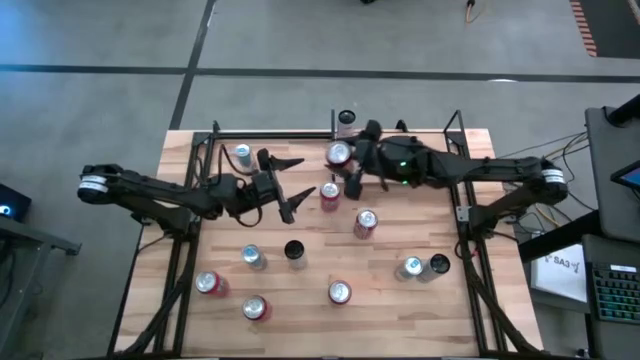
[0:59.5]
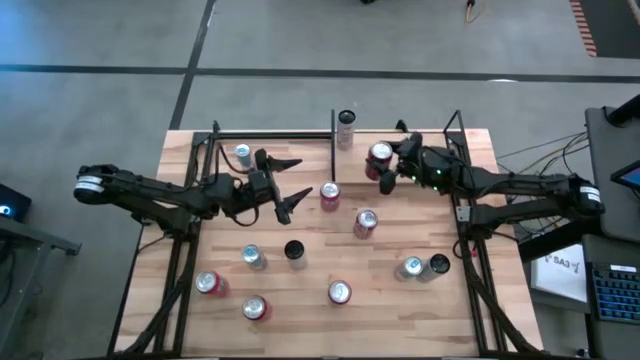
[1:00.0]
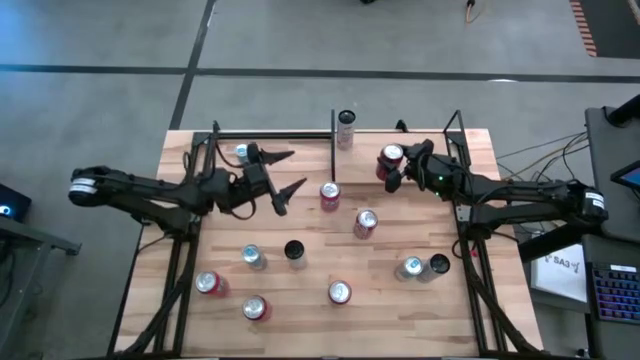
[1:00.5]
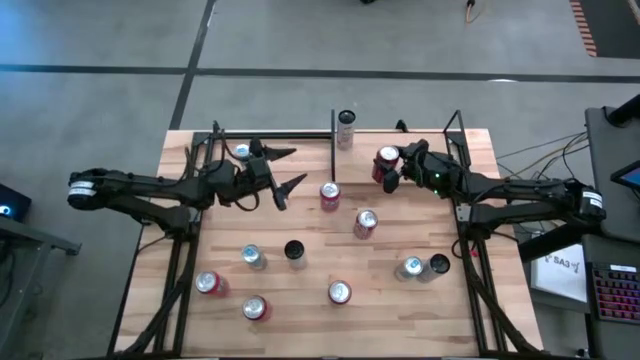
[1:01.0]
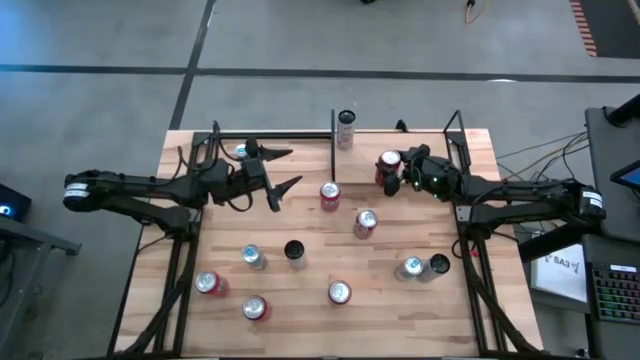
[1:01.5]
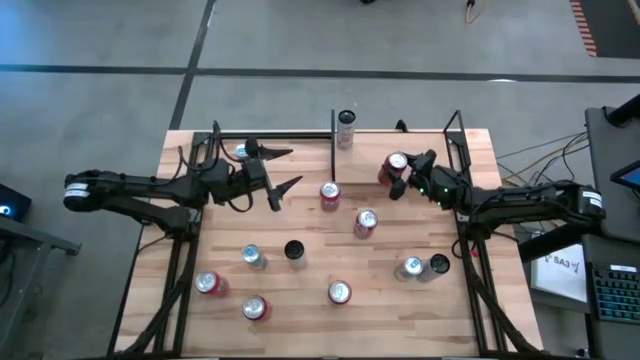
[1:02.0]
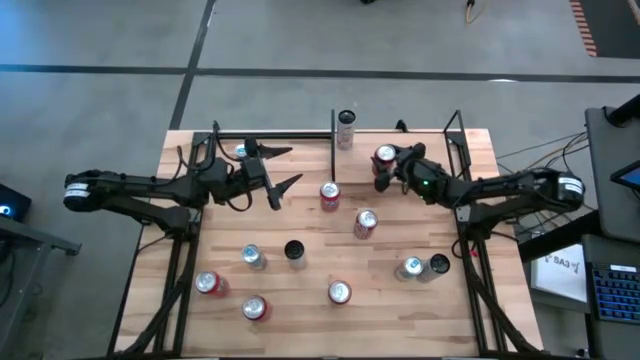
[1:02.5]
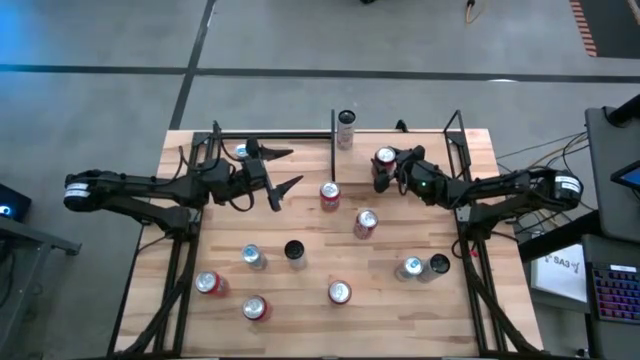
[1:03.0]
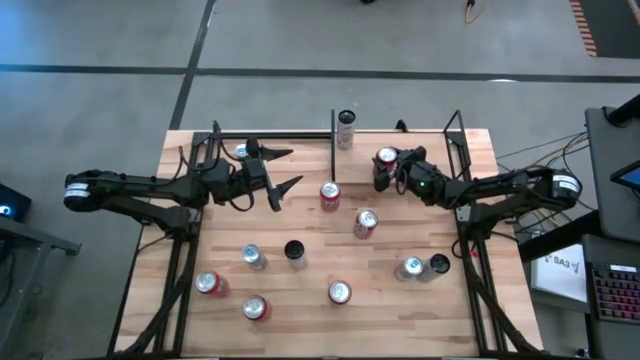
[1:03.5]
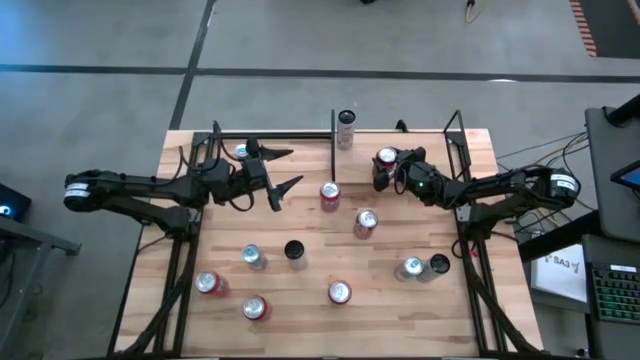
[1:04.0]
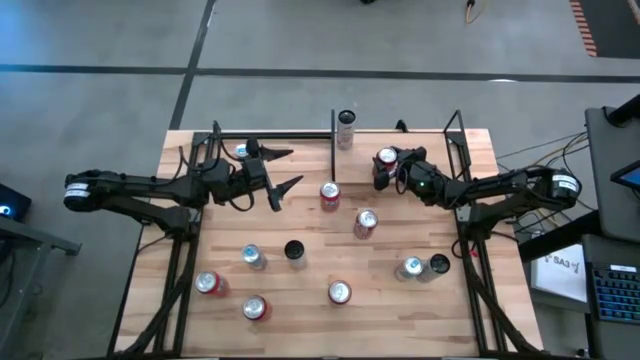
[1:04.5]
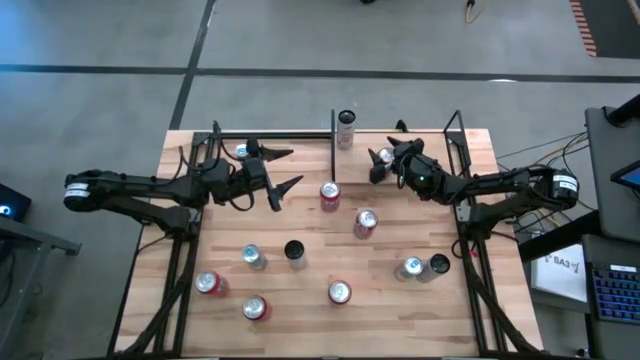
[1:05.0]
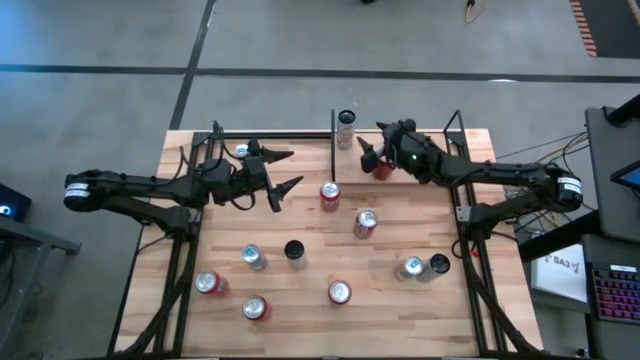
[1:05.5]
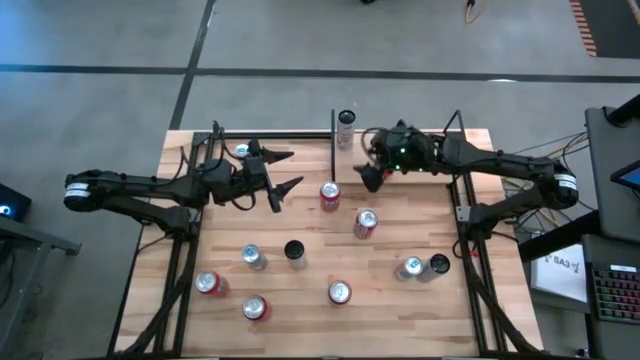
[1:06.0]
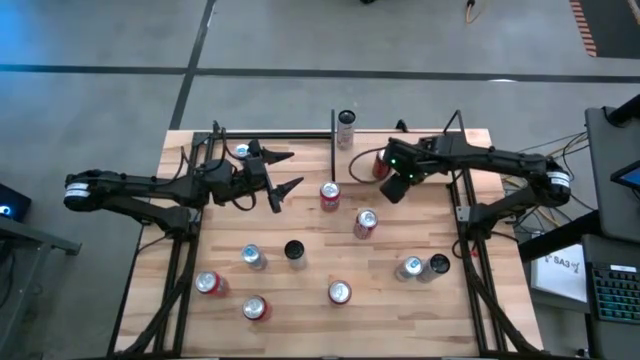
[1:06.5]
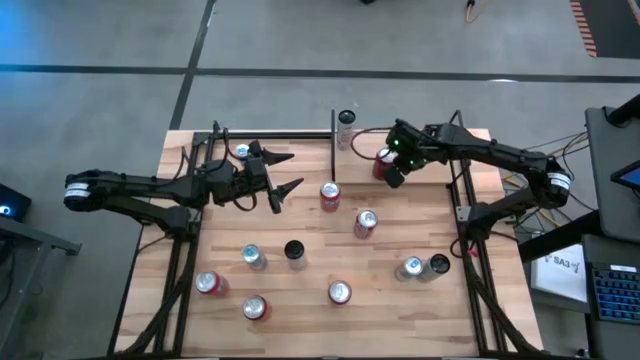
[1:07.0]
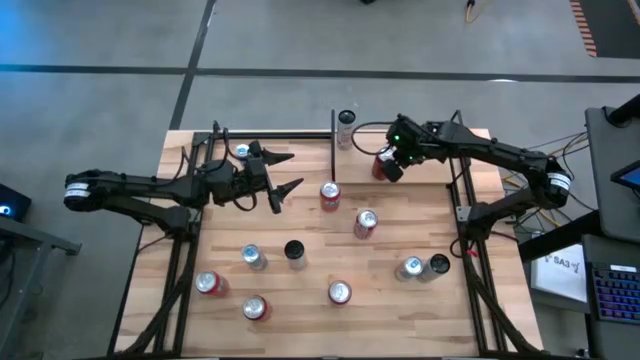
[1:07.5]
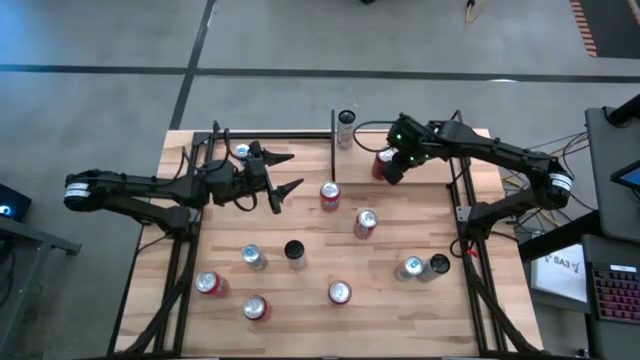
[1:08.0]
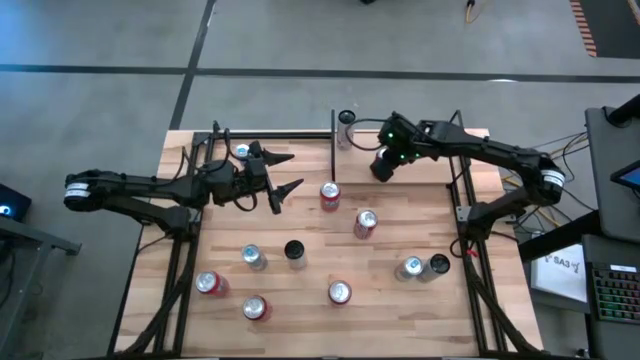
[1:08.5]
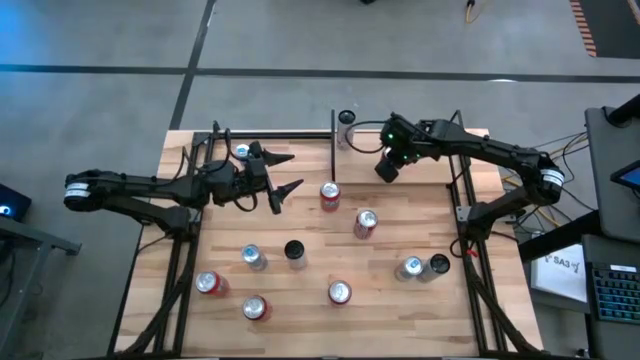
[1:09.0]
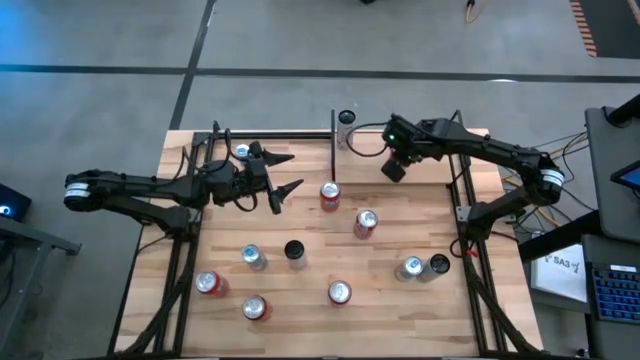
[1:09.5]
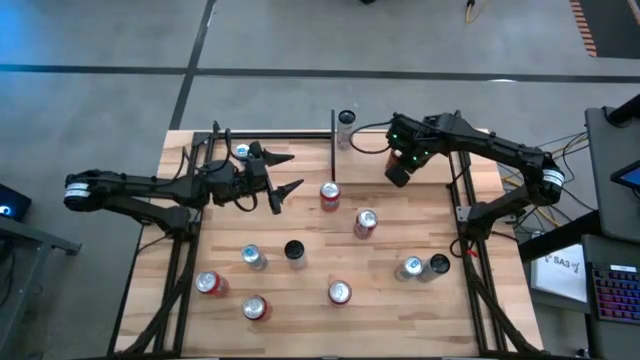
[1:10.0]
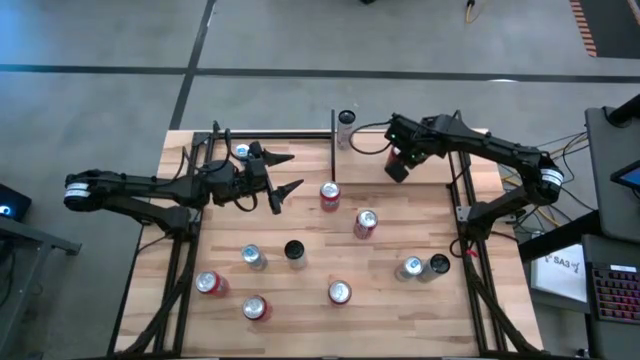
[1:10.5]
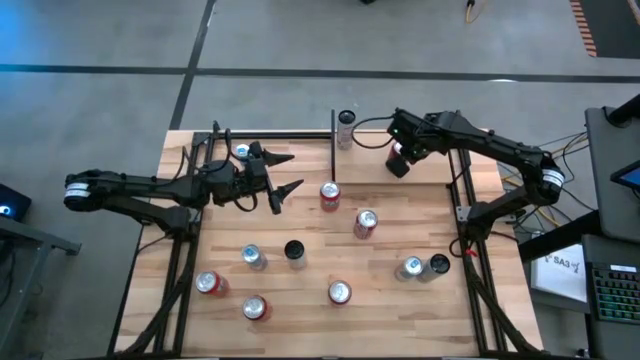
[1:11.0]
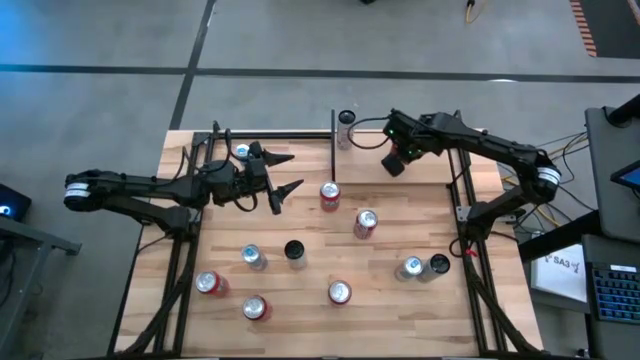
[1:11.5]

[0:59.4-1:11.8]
Task: Place canned beverage on shelf
Put the top red black soda can on the shelf

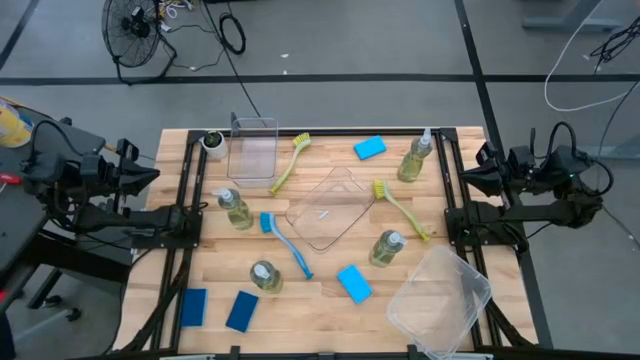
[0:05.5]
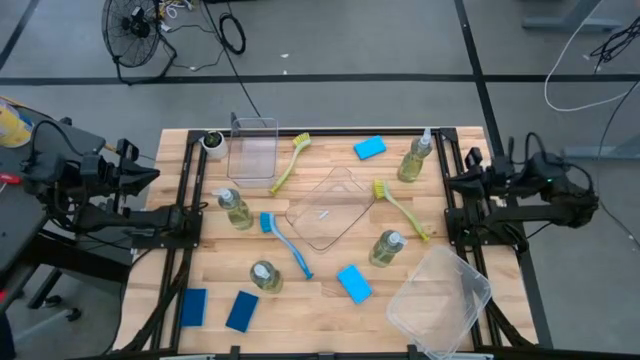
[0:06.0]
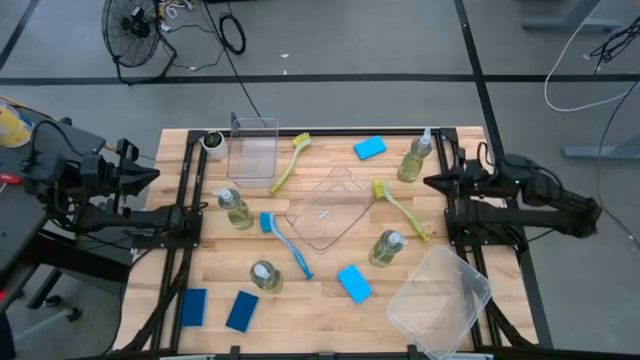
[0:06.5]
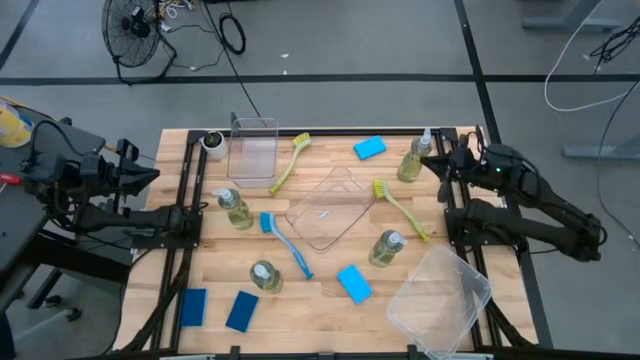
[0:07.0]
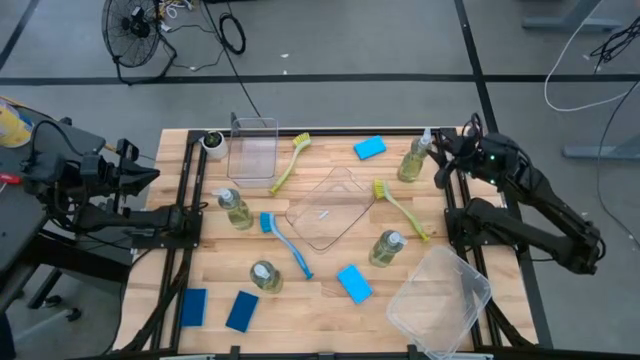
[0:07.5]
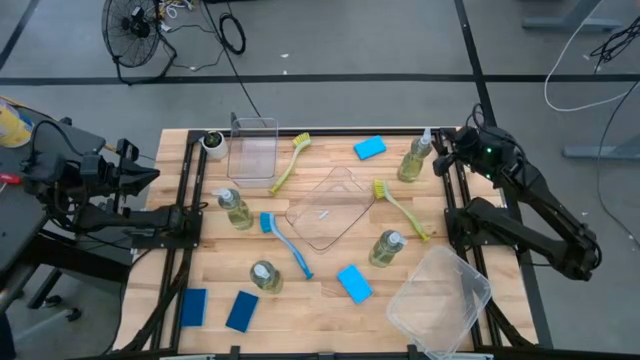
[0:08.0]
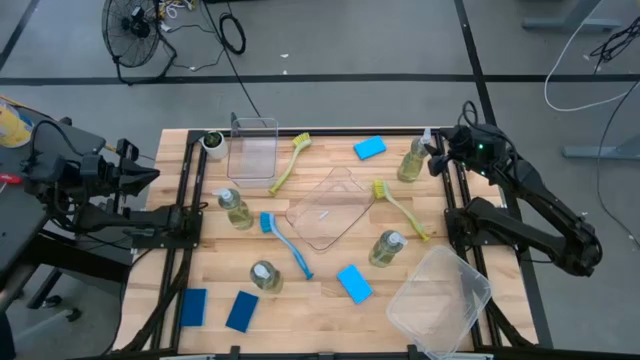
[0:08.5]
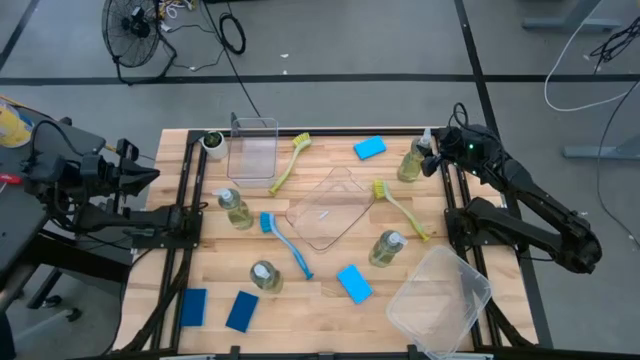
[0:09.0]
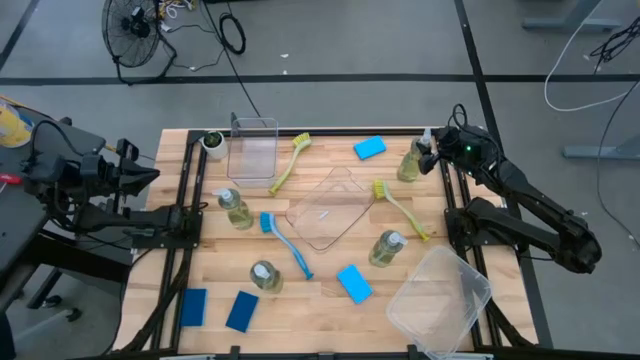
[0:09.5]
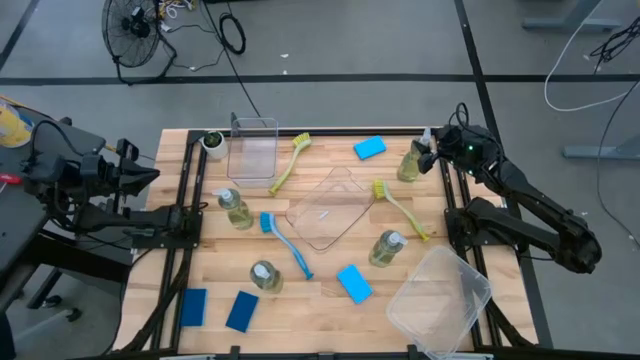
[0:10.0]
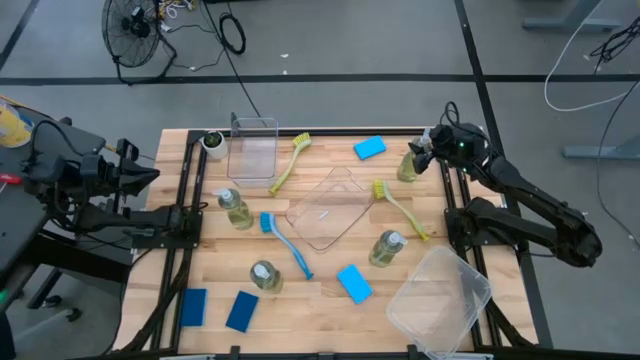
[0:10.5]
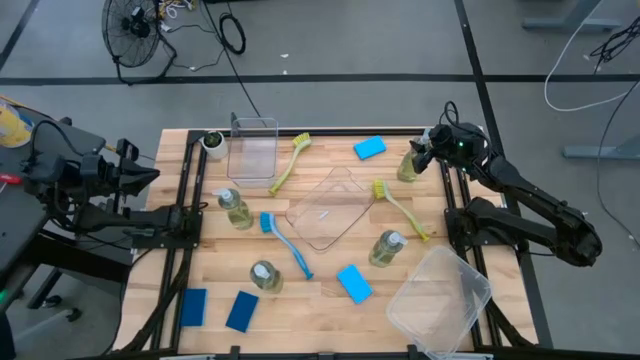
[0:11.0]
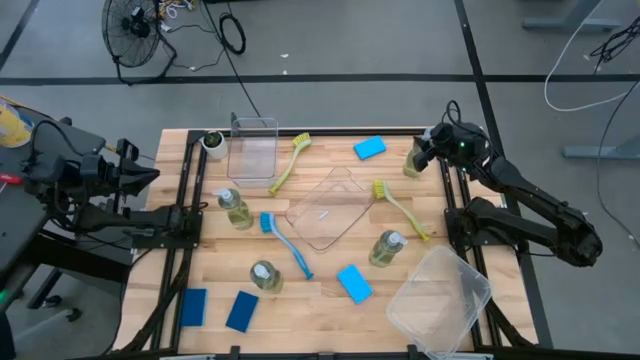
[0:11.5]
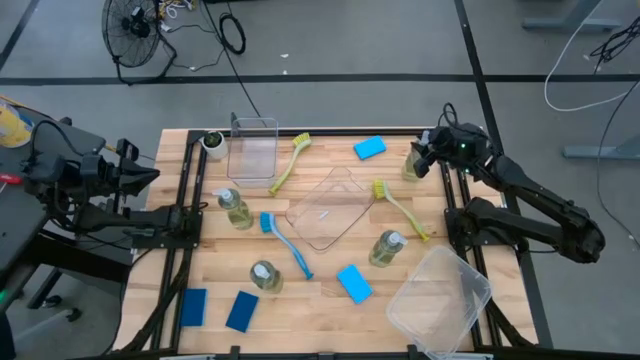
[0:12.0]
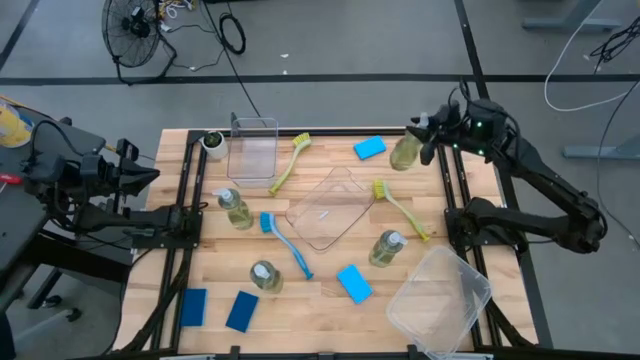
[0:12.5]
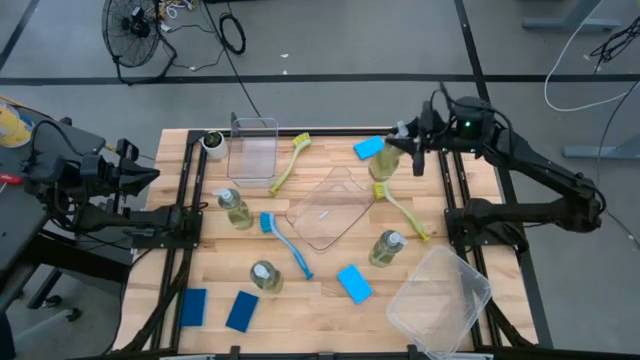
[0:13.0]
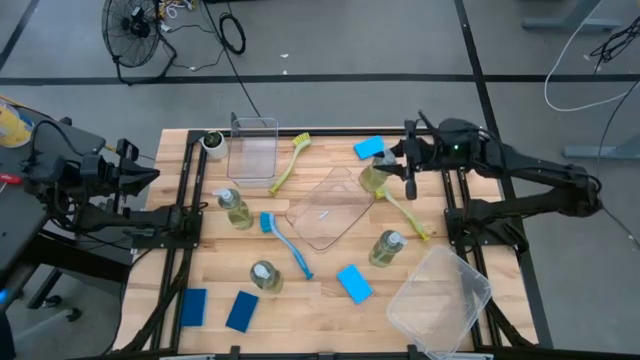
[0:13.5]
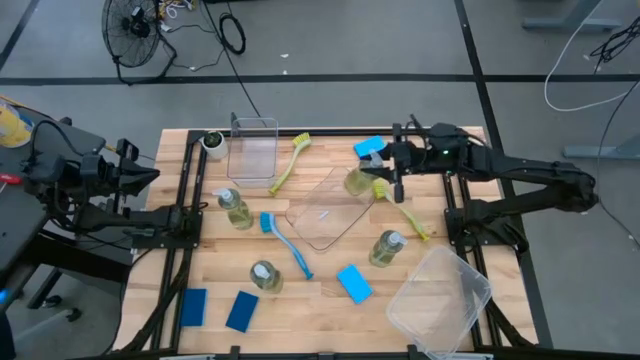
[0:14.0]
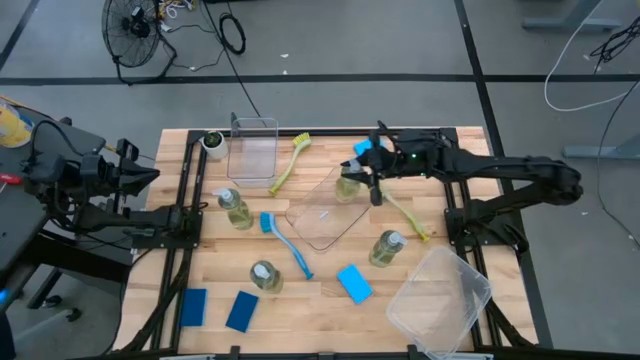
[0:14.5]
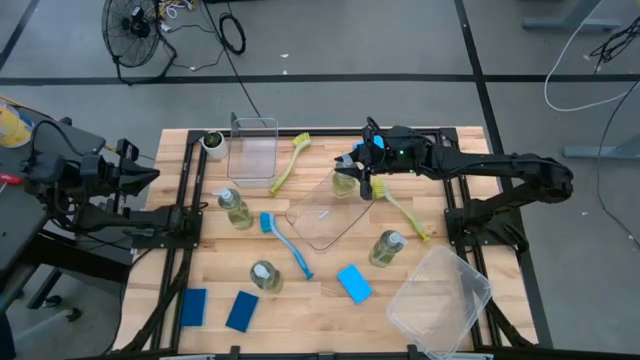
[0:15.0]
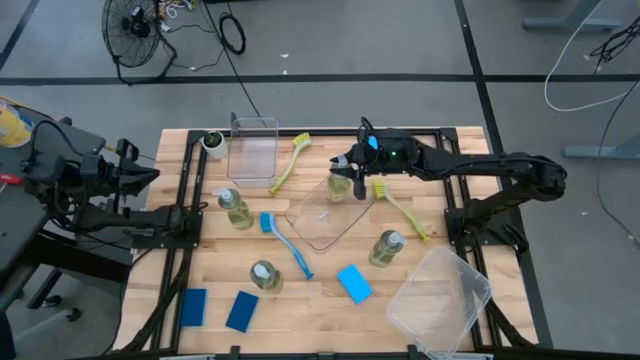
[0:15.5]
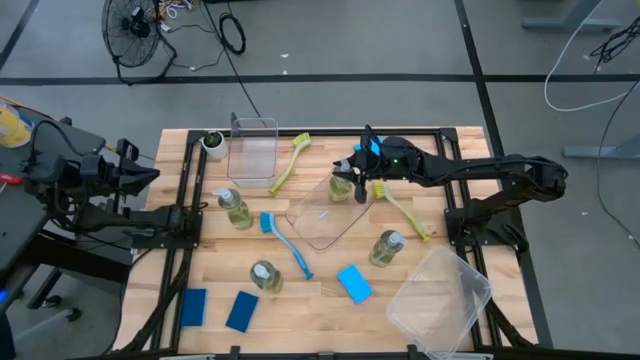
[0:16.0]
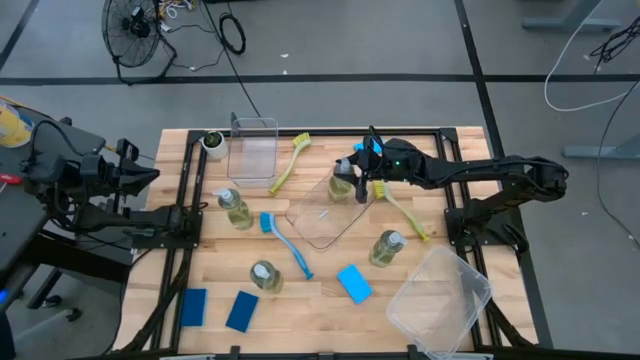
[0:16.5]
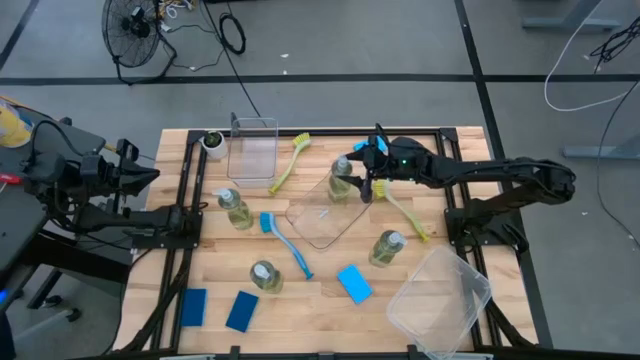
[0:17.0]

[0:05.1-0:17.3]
Task: Pick & Place Kitchen Sink Supplies
Put the dishwashing liquid bottle into the bottom transparent bin
